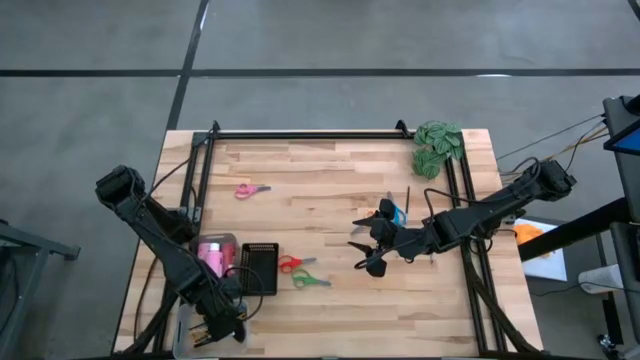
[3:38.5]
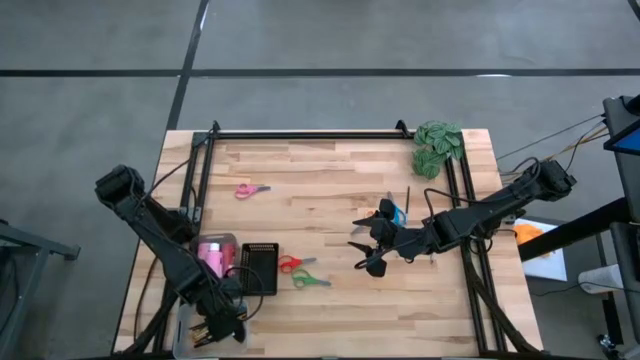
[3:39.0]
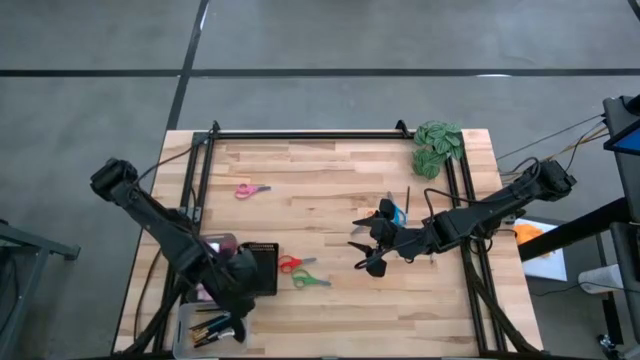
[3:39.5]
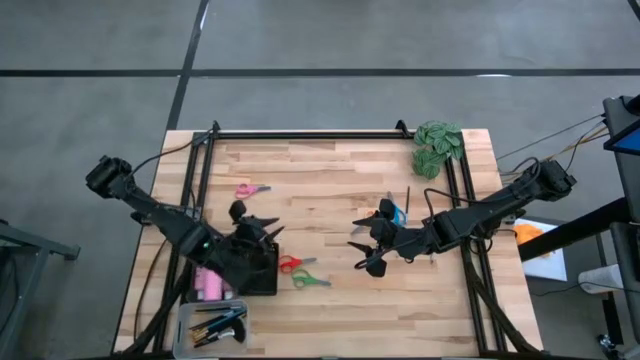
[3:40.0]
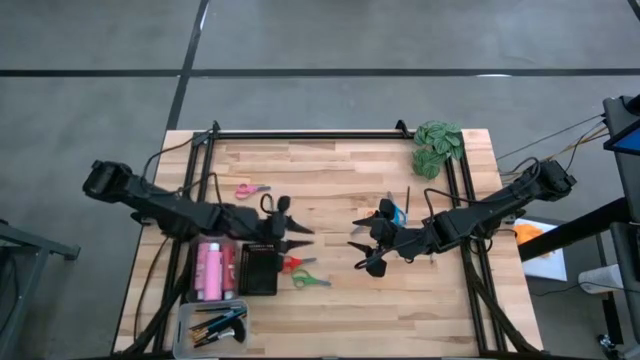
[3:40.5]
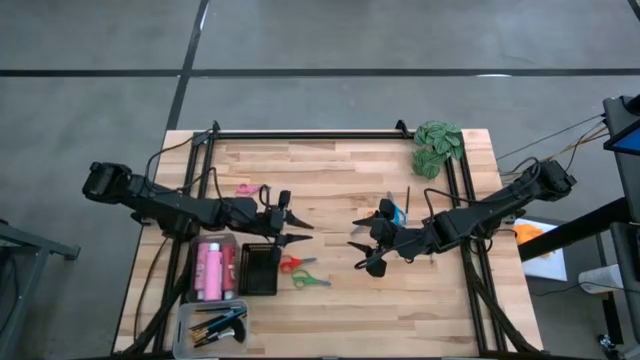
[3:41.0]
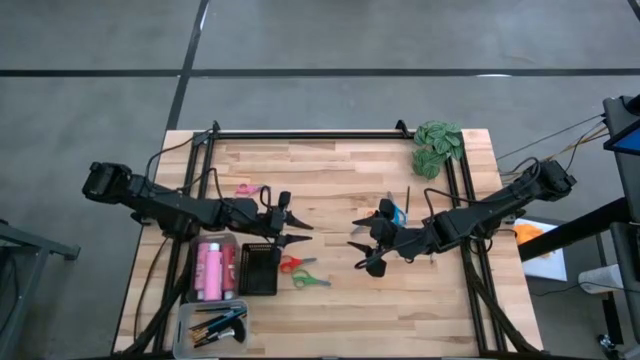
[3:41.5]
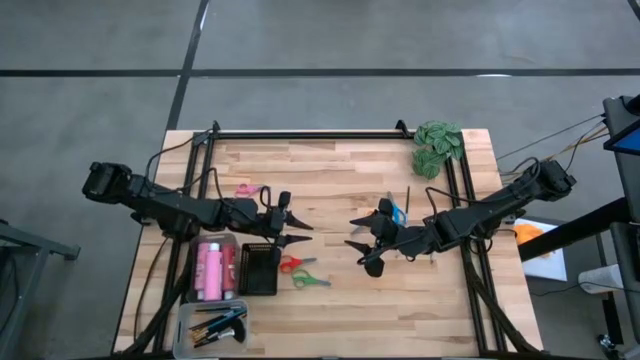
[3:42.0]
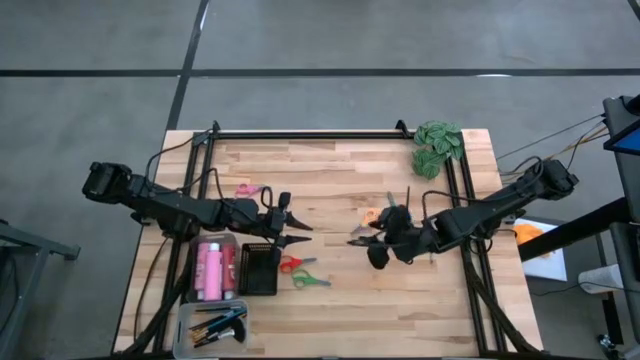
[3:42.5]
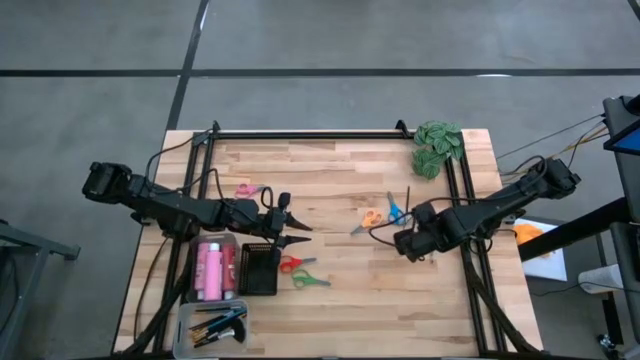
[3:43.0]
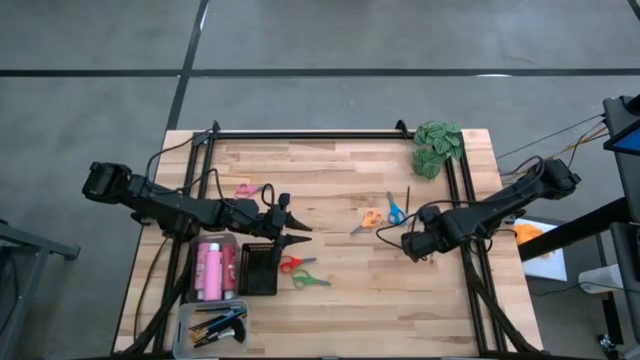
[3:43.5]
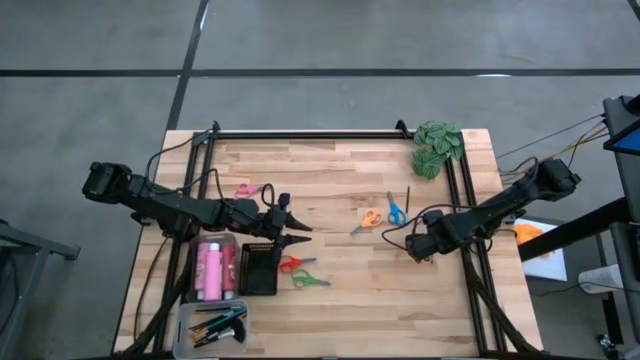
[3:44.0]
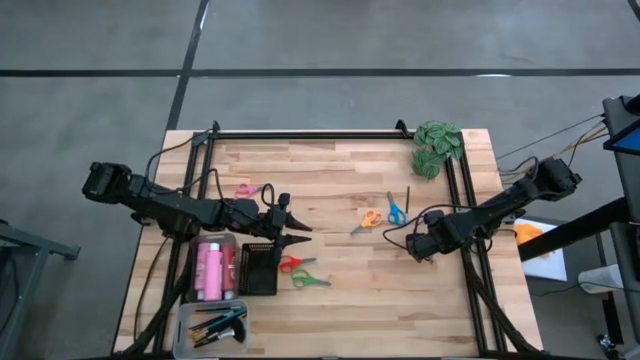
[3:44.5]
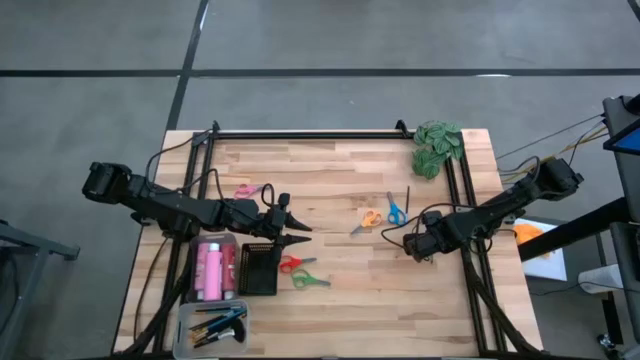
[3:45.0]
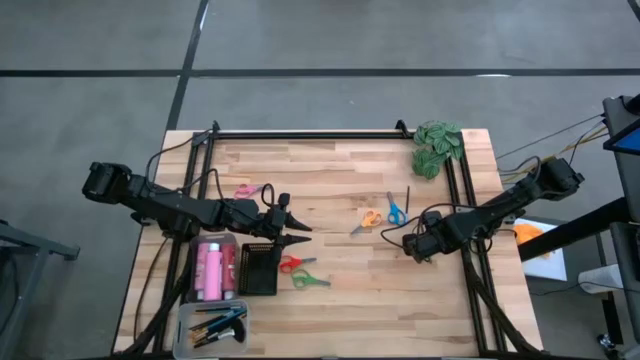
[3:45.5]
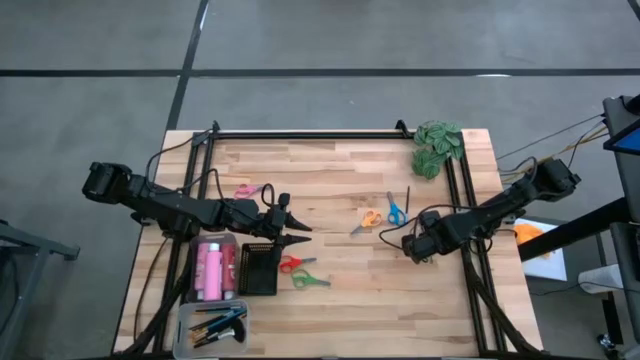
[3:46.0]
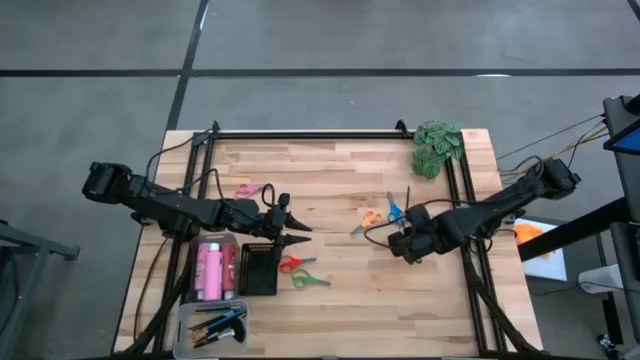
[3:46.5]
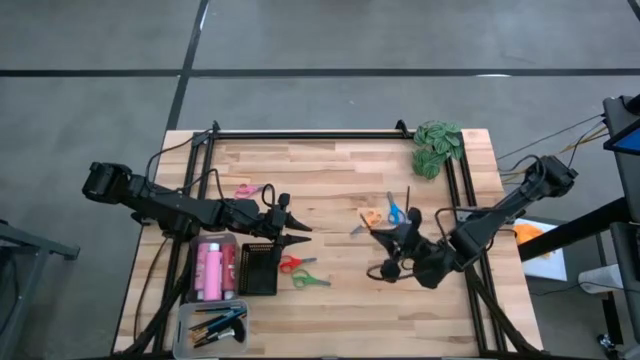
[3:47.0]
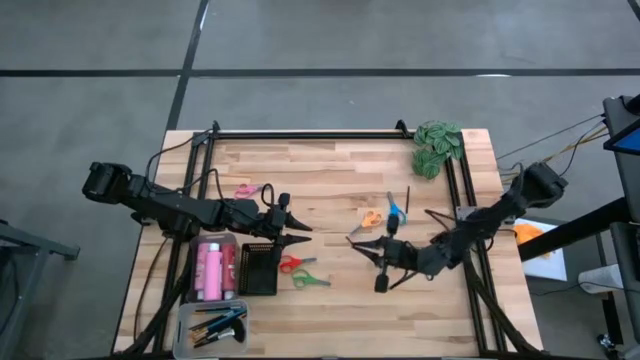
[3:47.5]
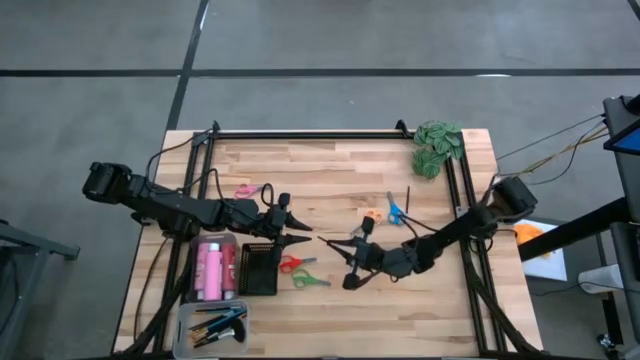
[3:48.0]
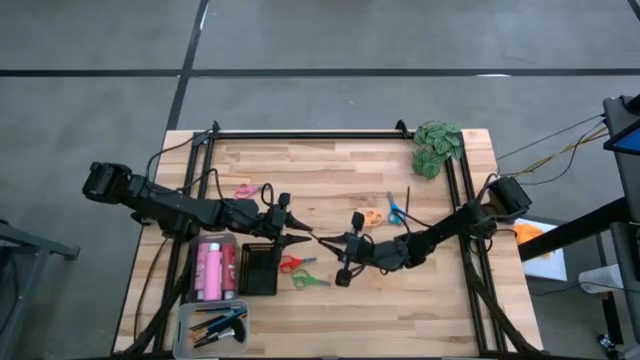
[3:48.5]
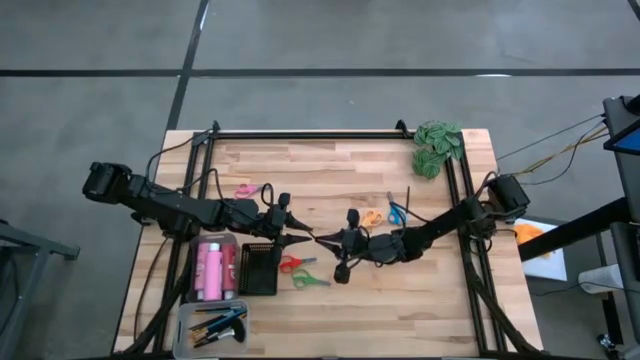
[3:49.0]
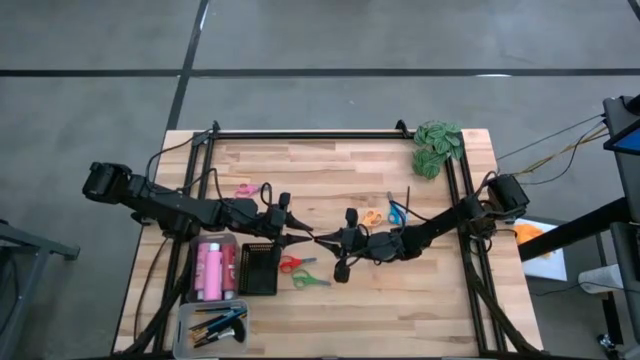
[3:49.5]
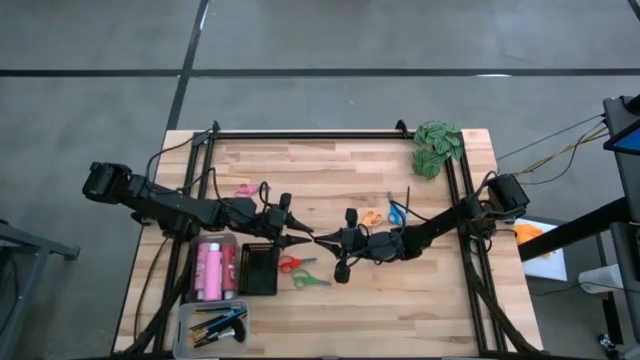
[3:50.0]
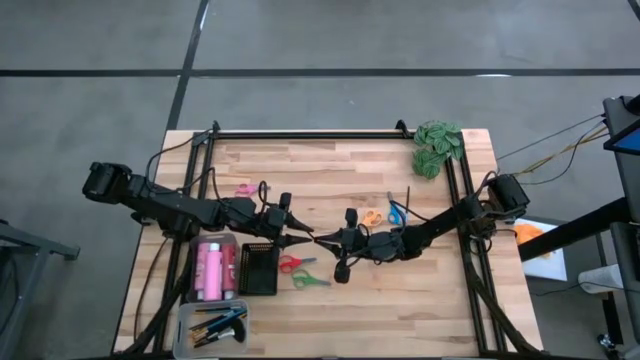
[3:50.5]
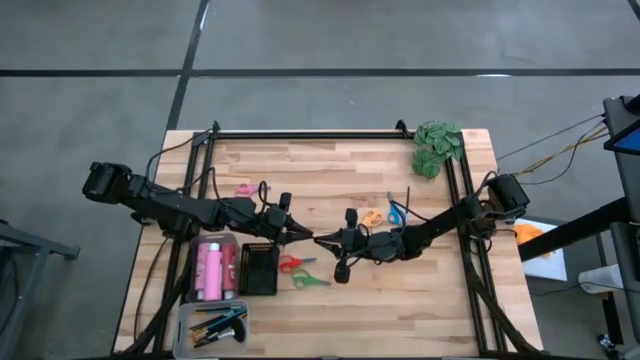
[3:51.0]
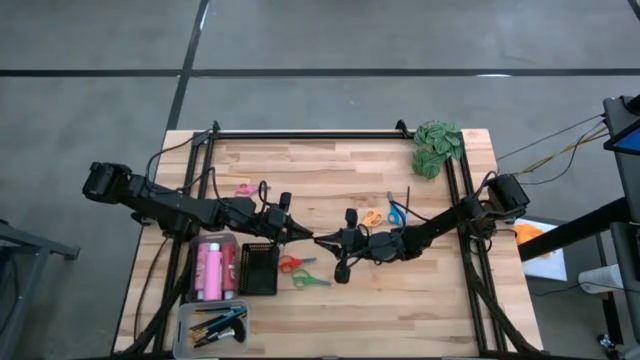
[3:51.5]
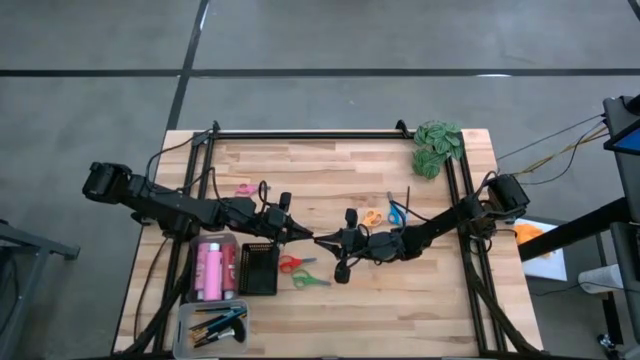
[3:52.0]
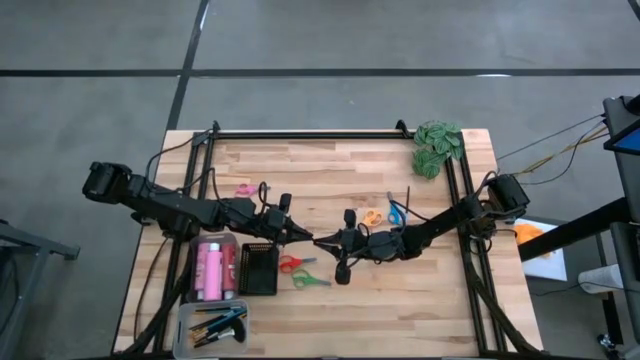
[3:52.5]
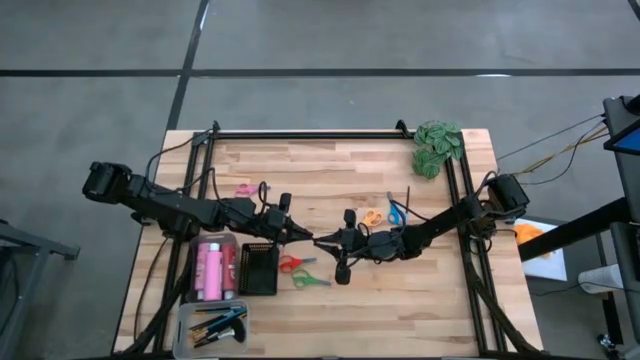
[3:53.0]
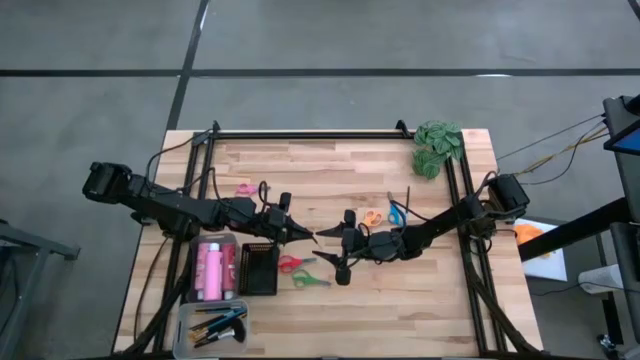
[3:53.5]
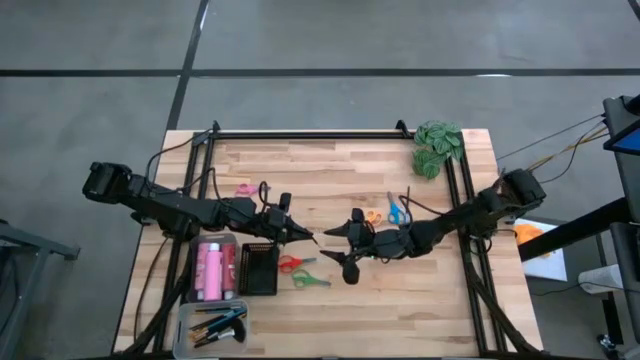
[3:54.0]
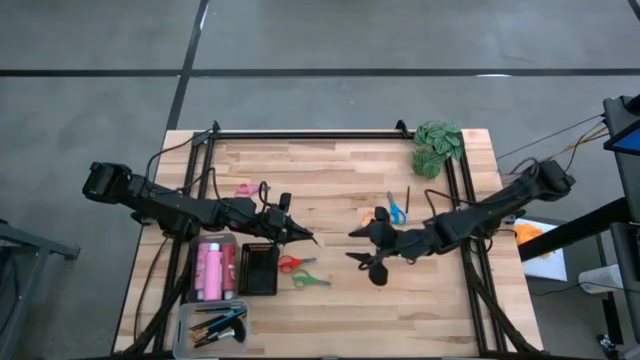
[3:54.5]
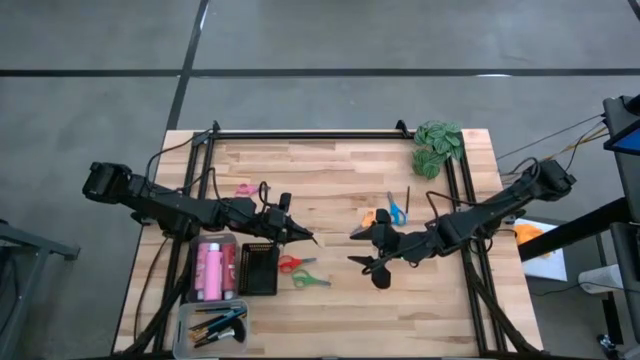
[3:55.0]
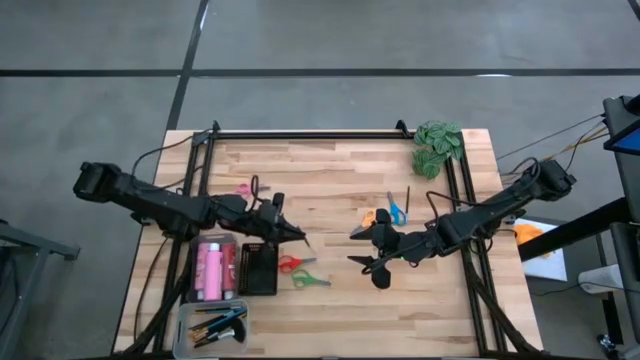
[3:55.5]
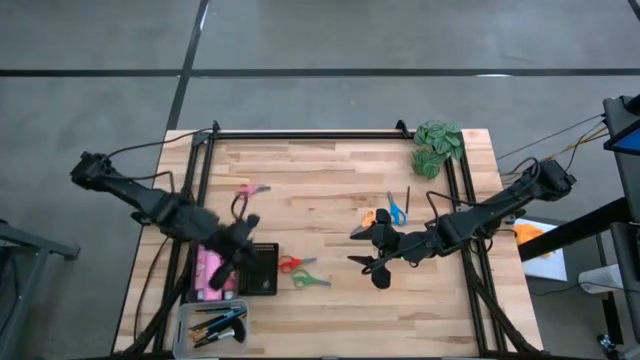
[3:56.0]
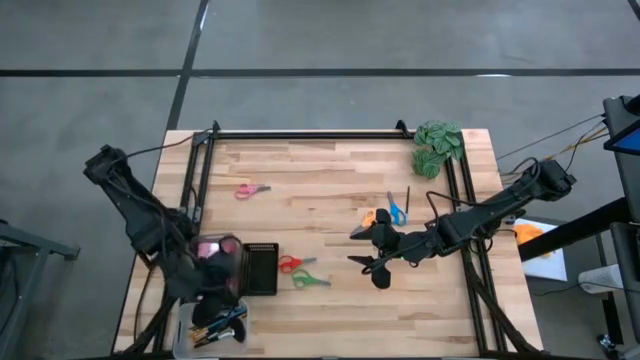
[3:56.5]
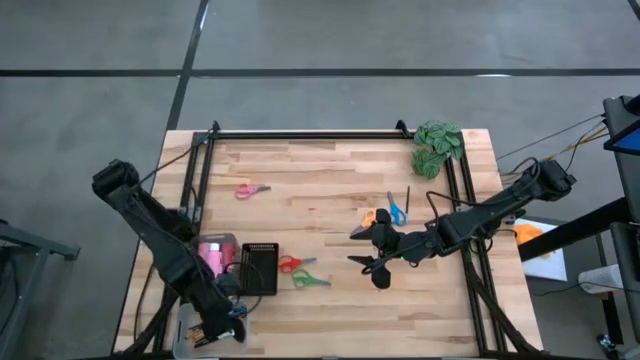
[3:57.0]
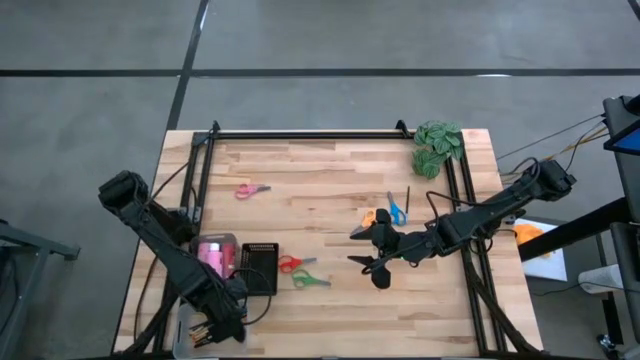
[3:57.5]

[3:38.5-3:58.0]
Task: Pick & Place Paint Supplies
Put the silver paint brush into the transparent bin

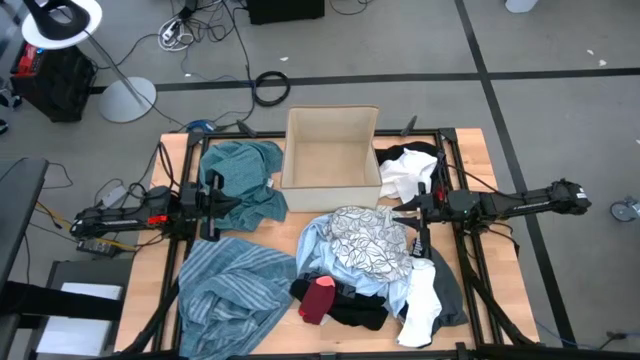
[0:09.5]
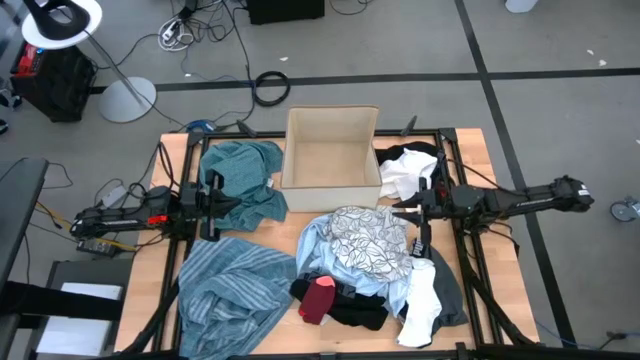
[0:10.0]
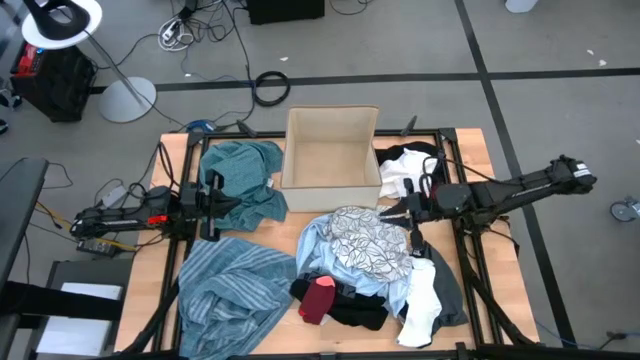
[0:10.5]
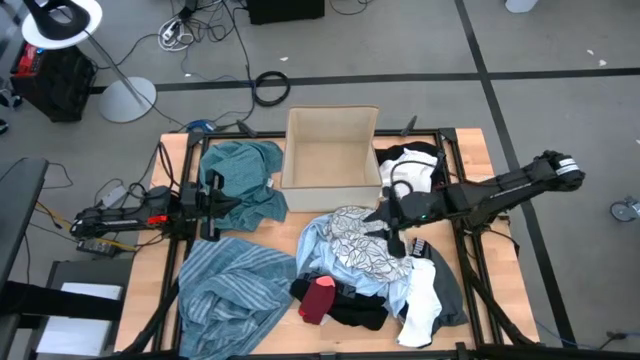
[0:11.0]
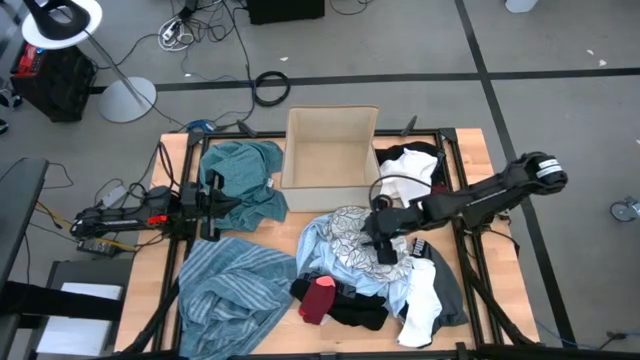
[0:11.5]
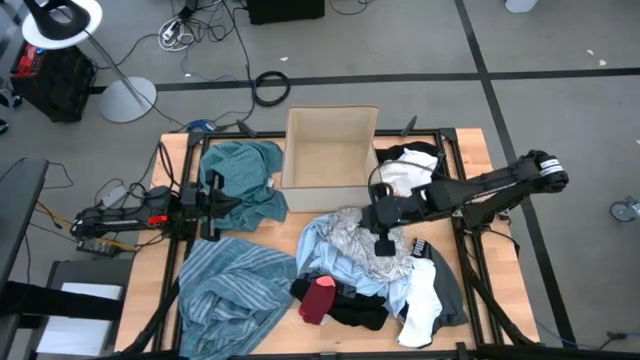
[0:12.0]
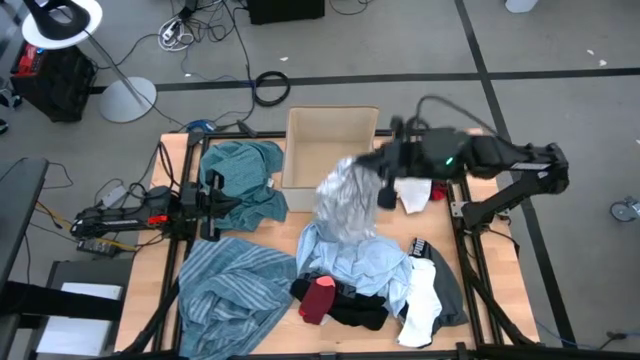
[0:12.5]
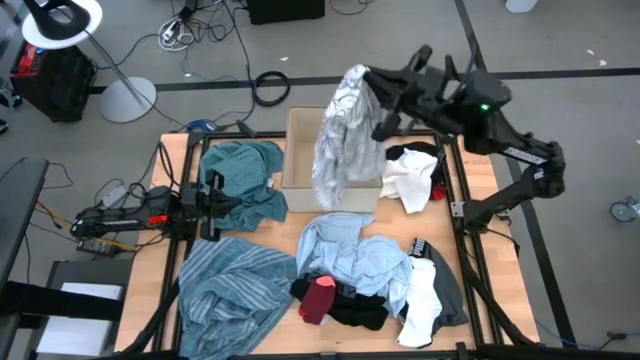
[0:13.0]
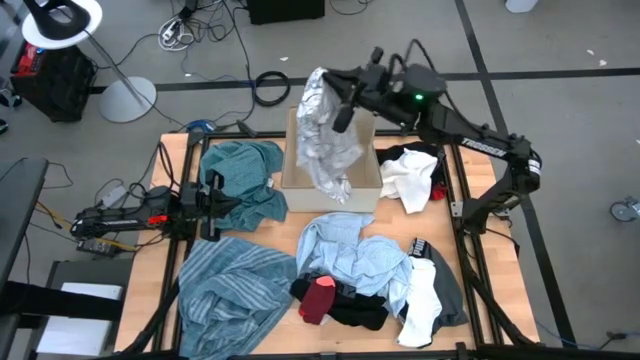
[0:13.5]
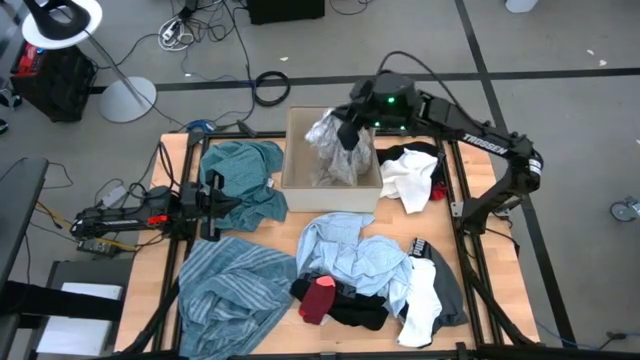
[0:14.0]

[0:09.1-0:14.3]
Task: Sort clothes
Put the white patterned shirt into the white laundry bin
